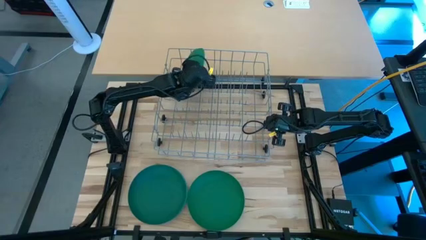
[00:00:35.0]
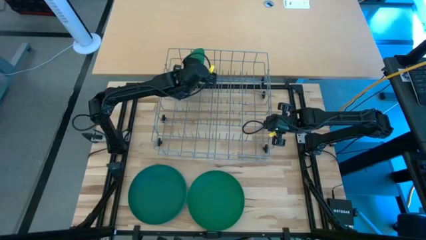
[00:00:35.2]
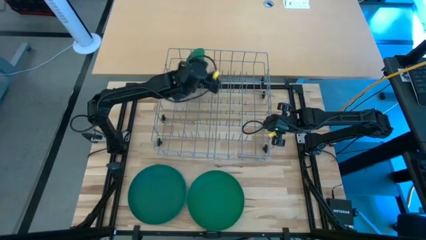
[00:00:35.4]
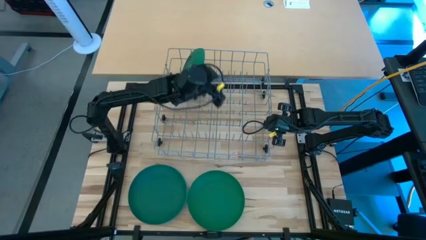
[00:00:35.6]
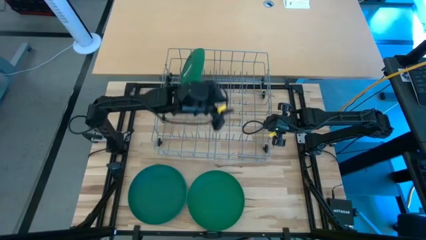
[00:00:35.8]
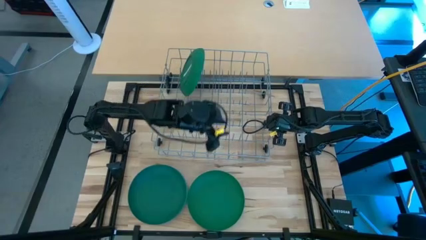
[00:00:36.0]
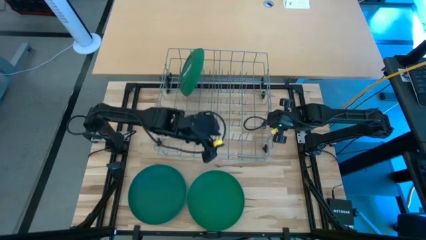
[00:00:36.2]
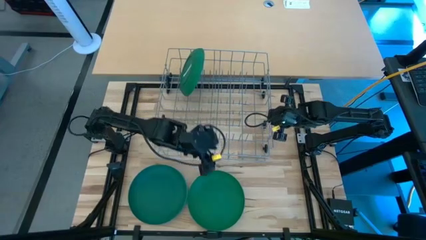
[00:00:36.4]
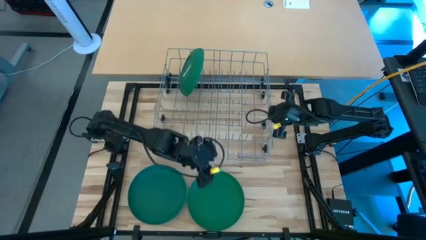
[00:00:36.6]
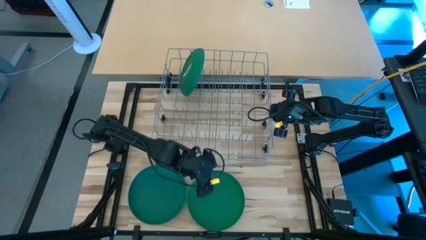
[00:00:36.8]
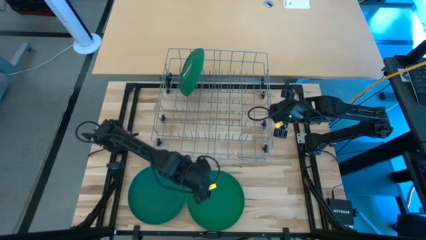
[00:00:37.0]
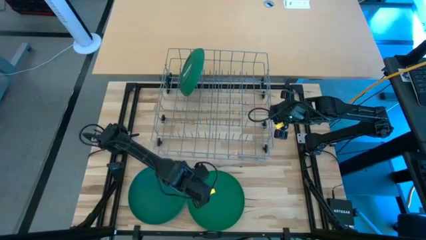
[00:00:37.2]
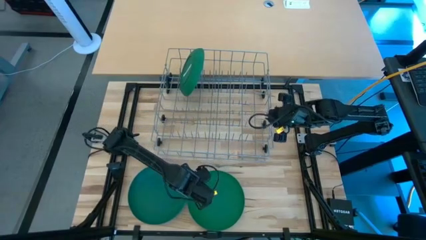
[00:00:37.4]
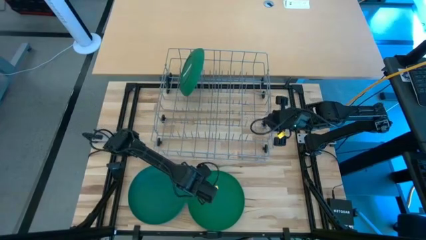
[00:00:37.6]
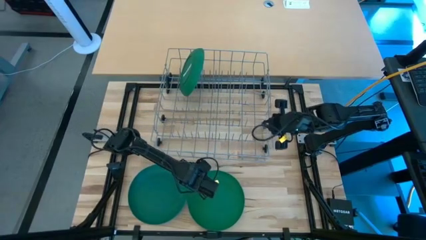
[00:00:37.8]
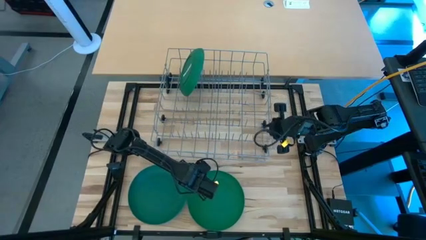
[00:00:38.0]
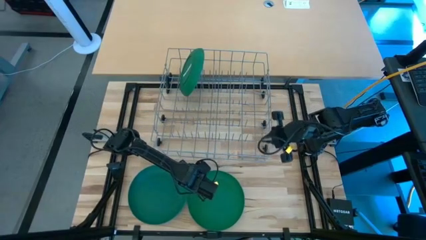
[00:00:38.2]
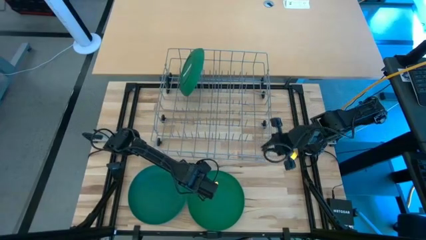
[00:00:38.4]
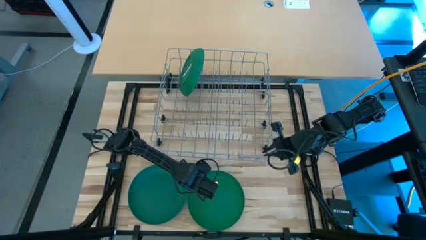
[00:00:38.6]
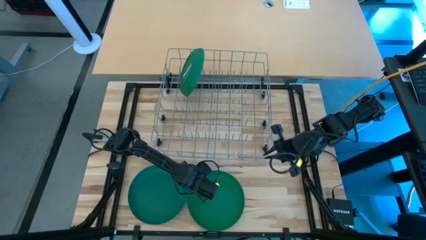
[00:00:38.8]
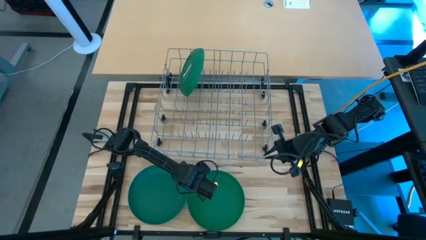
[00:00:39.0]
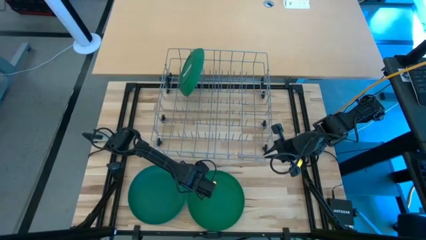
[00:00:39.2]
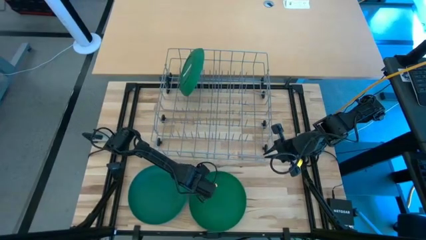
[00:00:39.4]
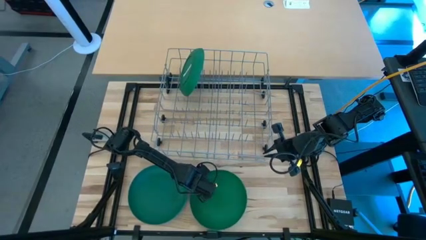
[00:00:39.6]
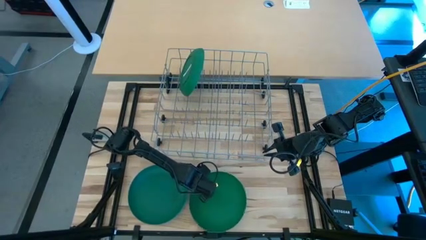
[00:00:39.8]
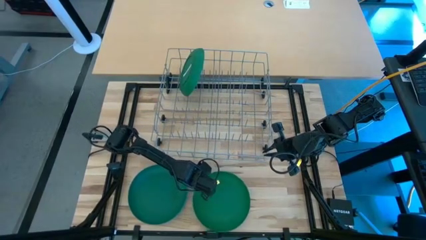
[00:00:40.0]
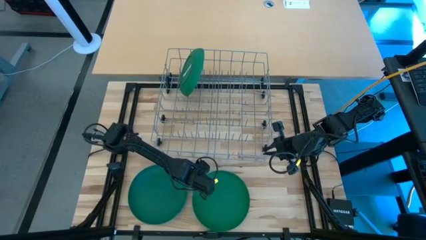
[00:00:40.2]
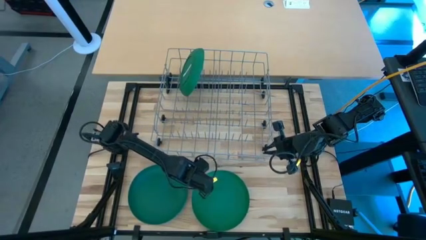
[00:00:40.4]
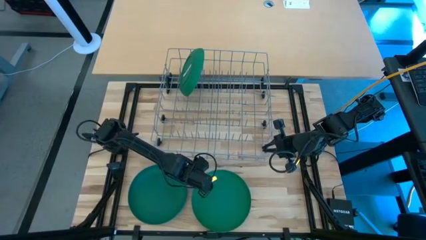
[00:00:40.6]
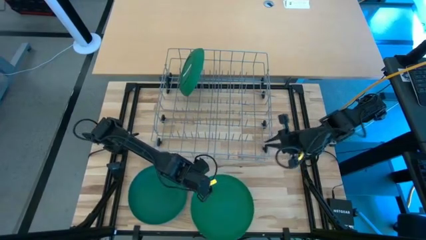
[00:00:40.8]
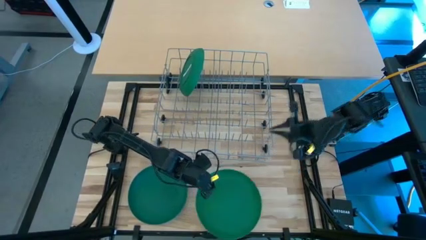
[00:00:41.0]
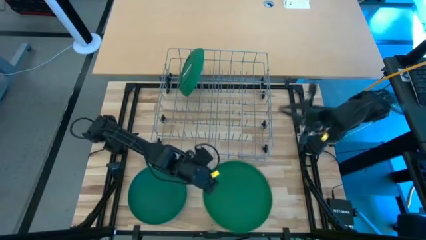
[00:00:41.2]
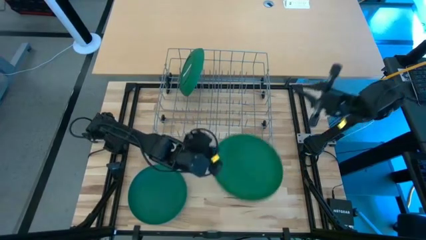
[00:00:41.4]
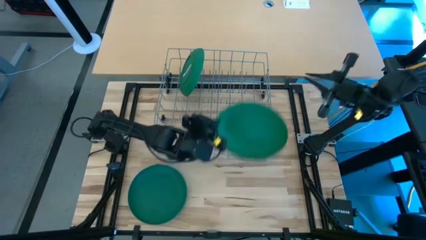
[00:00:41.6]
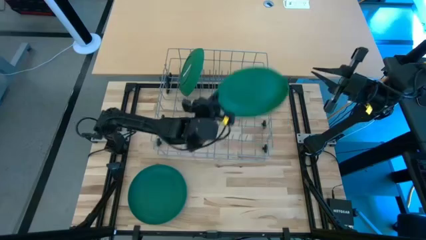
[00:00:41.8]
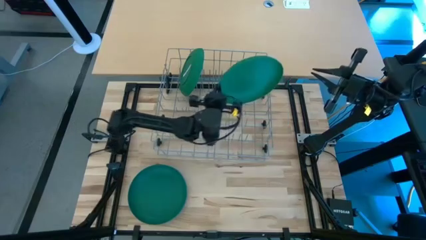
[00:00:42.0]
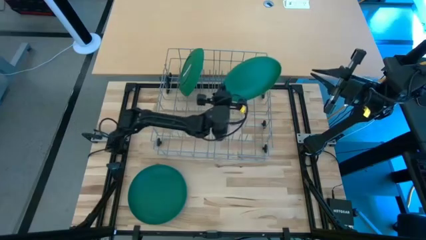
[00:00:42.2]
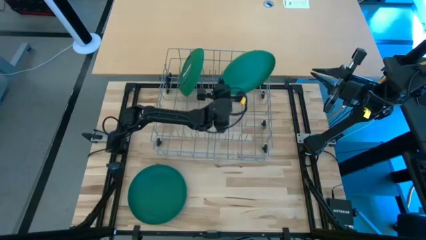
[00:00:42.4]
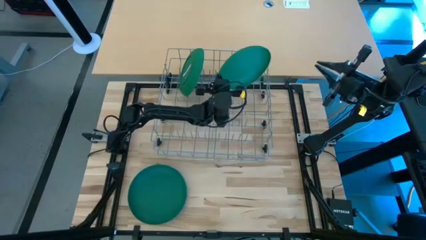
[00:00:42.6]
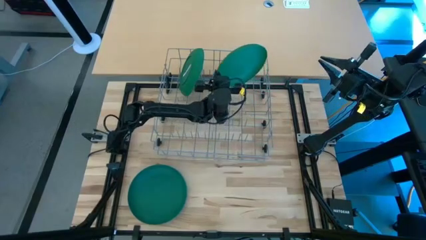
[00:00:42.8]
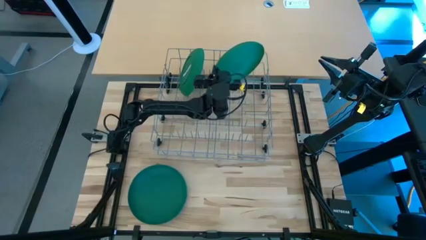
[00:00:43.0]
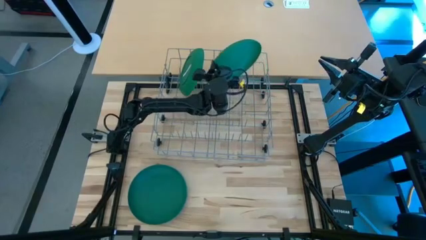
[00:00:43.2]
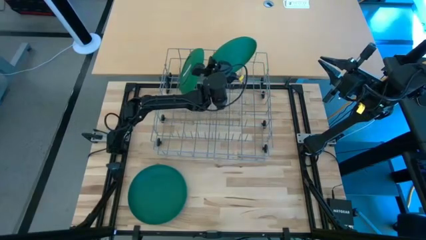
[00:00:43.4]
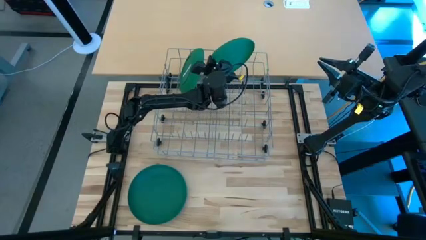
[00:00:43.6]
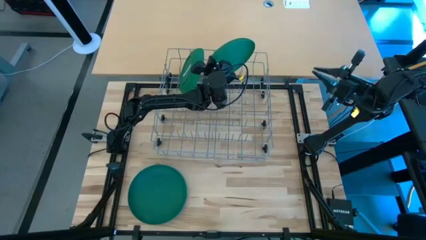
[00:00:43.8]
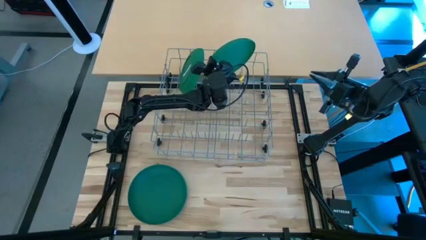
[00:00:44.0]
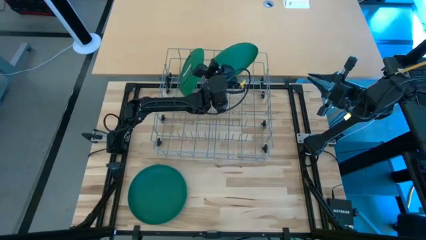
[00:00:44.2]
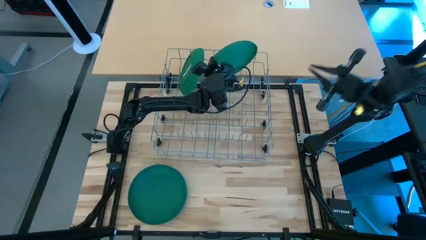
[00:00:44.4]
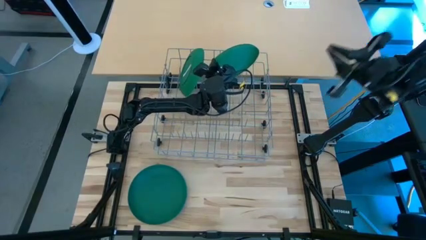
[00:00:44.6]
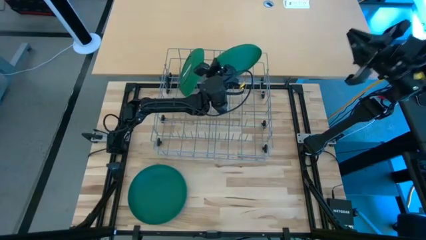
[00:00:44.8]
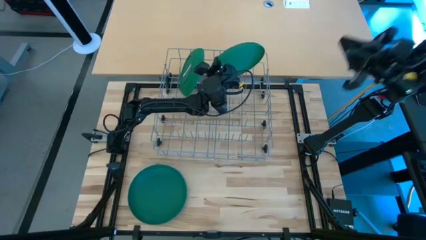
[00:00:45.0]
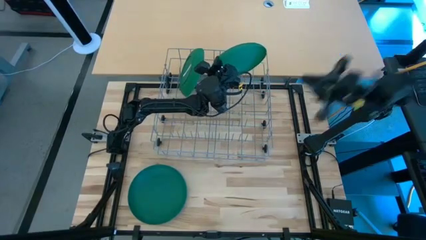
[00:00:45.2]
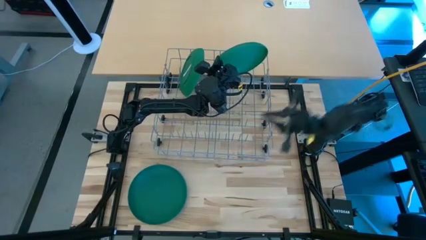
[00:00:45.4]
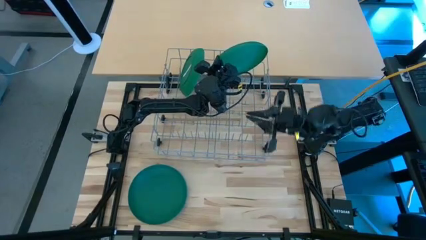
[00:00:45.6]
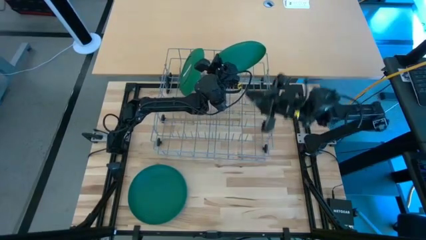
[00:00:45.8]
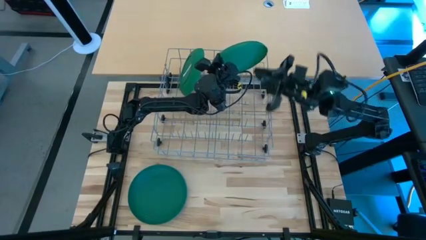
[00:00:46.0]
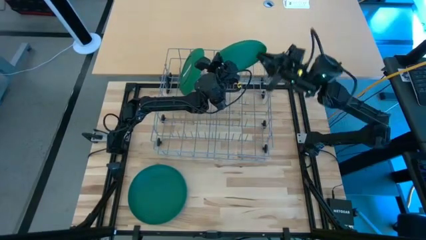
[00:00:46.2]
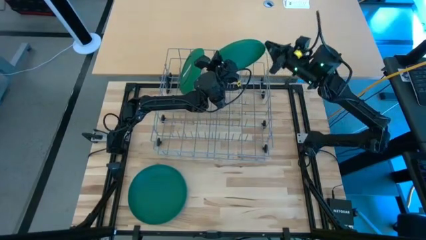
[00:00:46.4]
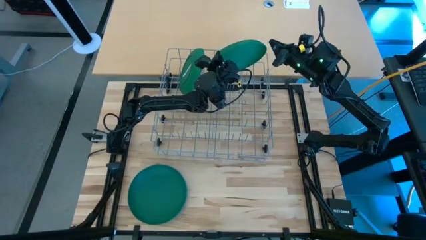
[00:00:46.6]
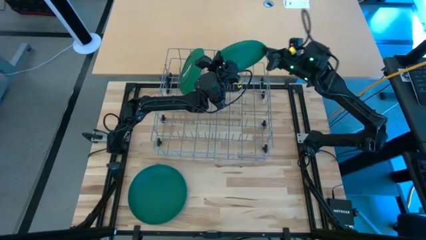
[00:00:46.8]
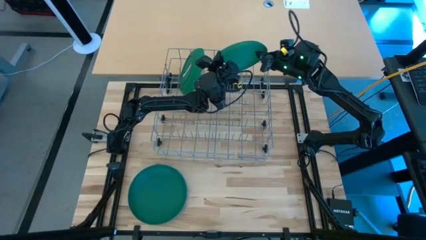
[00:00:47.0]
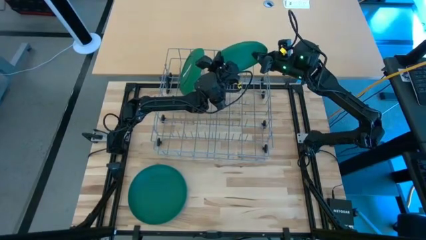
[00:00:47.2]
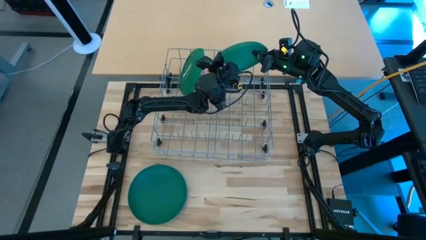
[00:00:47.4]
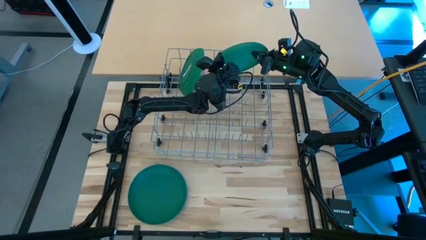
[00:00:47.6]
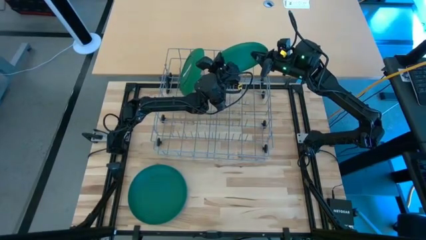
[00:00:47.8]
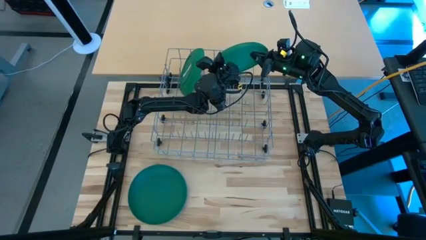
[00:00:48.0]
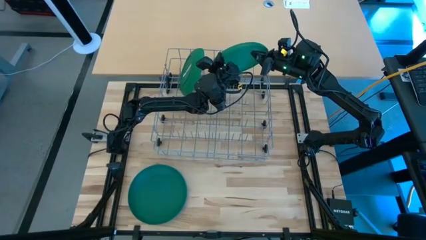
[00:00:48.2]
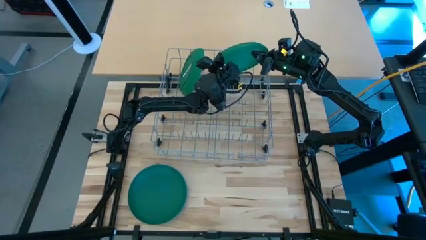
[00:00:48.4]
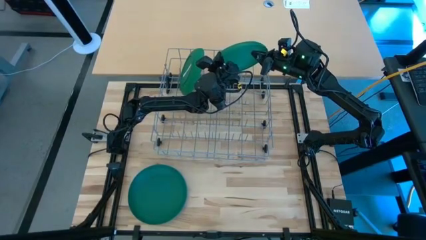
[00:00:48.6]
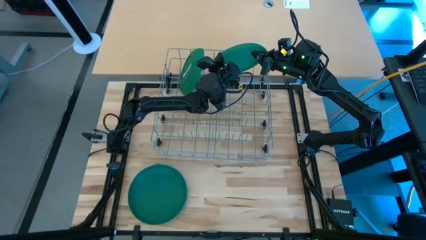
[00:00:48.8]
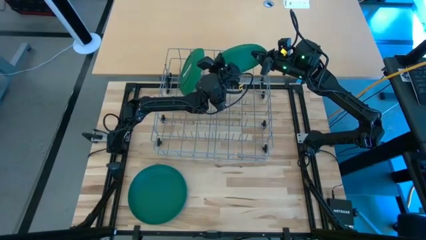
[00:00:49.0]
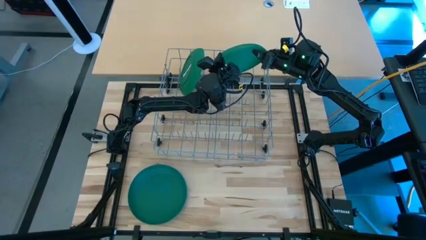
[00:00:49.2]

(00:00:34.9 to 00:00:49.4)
Task: Sort dishes
Put the right green plate in the dish rack

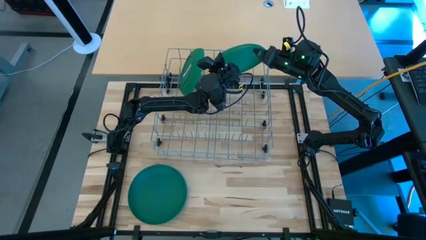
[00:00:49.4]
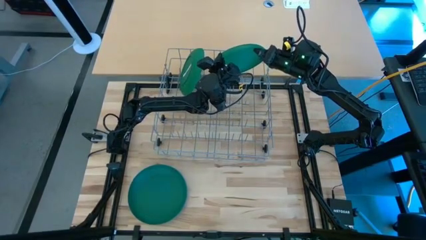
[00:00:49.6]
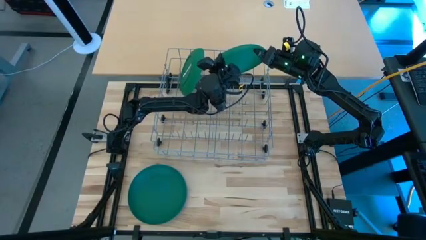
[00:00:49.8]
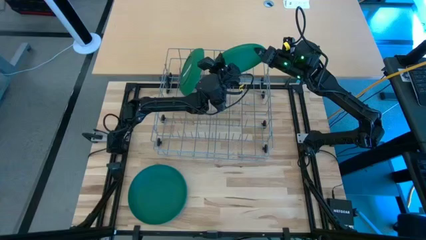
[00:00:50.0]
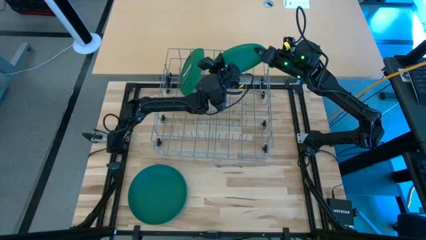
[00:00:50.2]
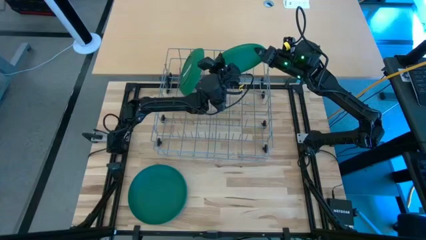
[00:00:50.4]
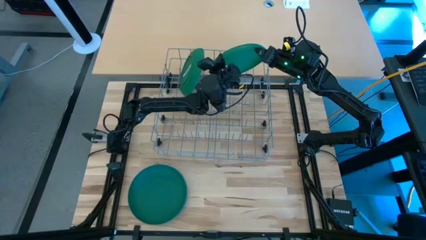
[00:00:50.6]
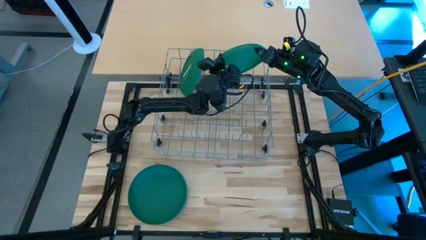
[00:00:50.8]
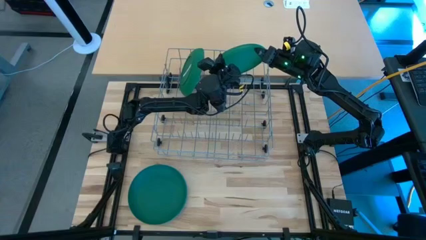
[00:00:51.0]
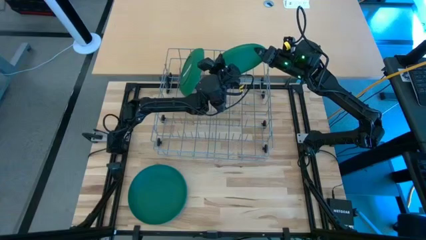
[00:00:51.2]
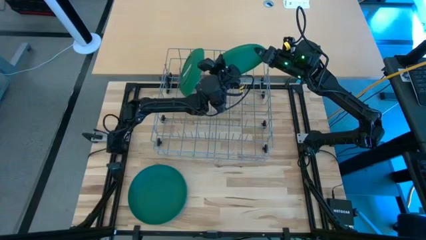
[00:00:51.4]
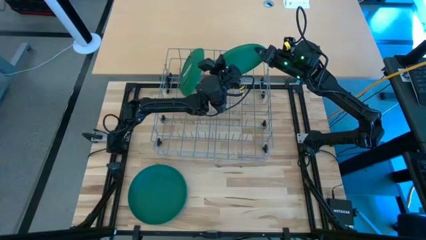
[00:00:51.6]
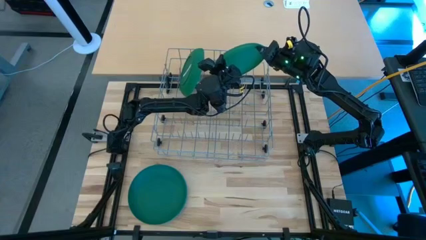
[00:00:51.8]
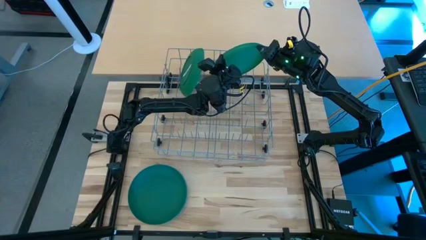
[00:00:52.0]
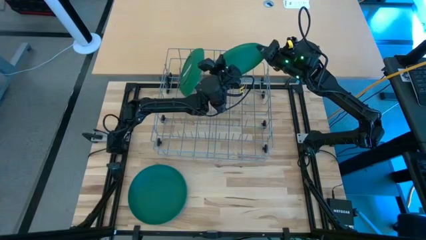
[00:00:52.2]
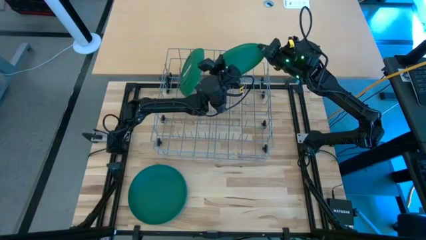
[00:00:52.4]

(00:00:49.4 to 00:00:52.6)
Put the right green plate in the dish rack
